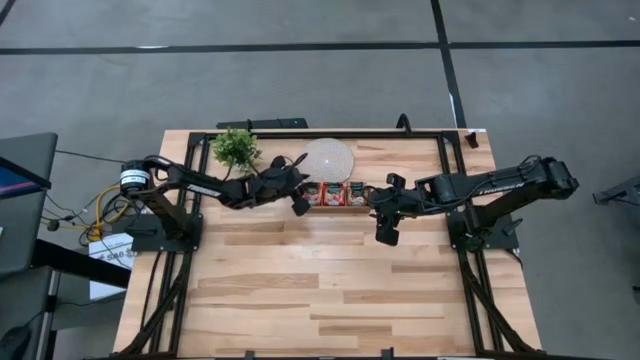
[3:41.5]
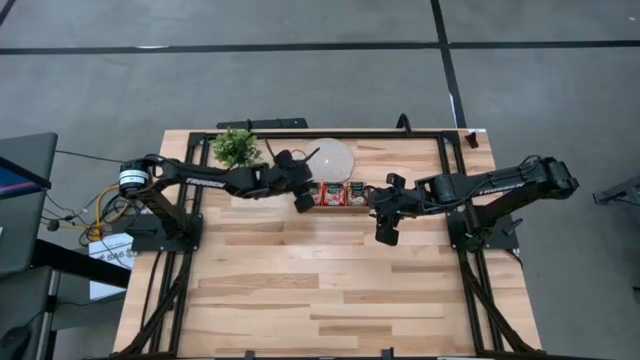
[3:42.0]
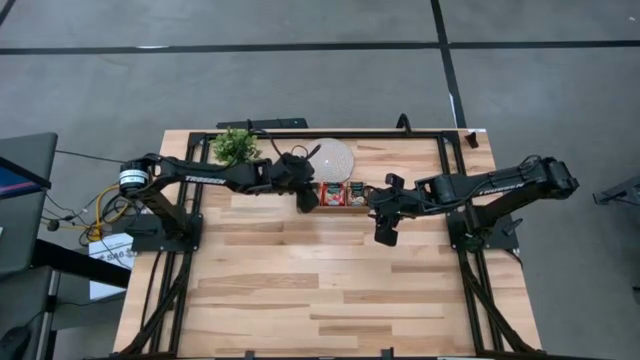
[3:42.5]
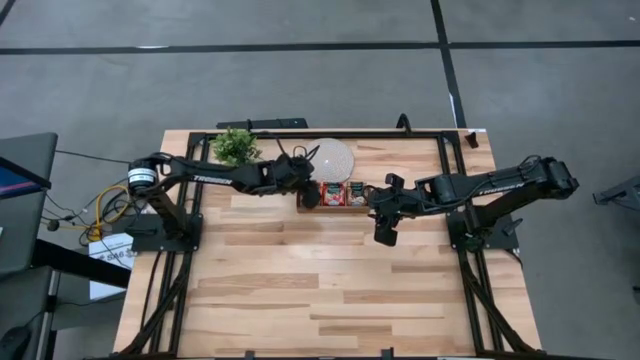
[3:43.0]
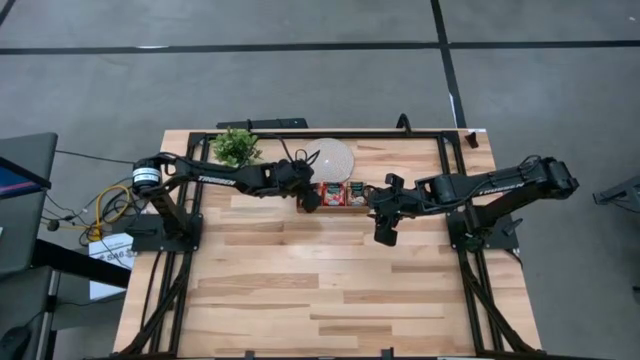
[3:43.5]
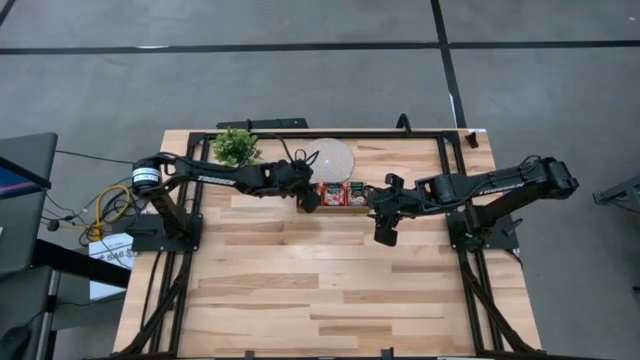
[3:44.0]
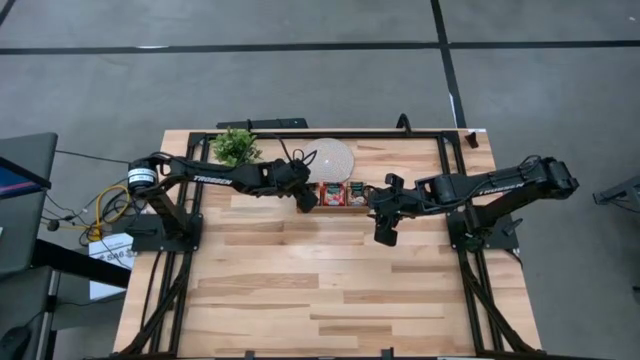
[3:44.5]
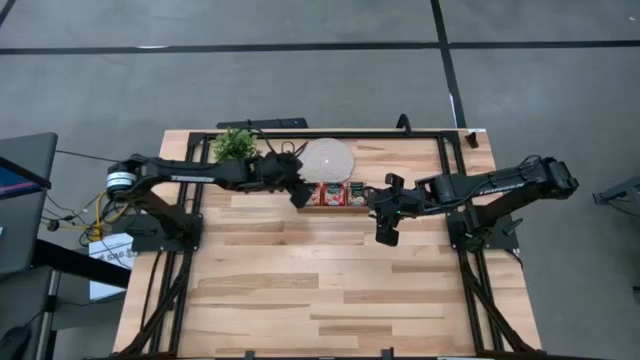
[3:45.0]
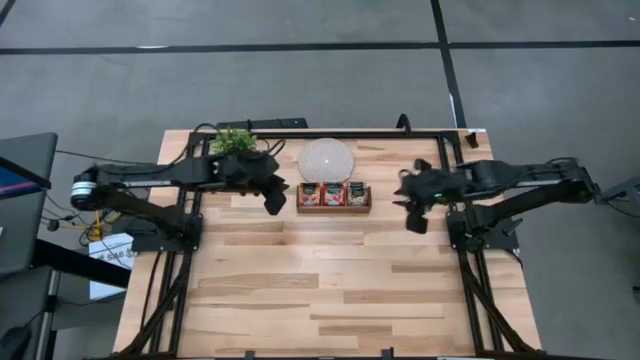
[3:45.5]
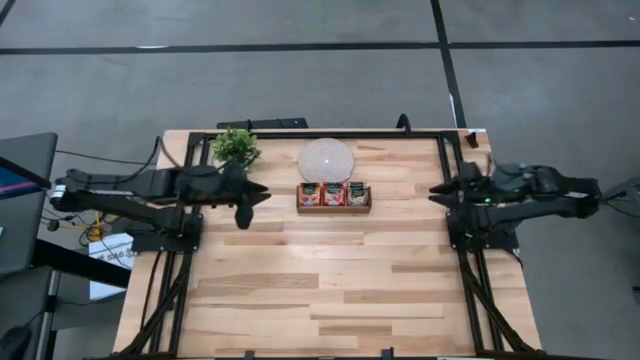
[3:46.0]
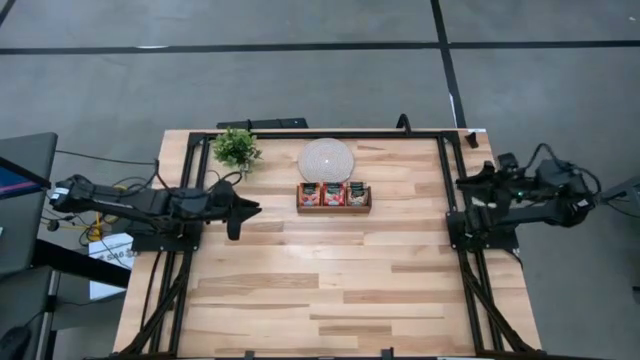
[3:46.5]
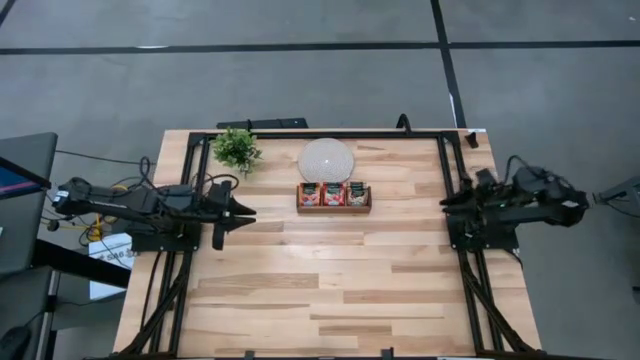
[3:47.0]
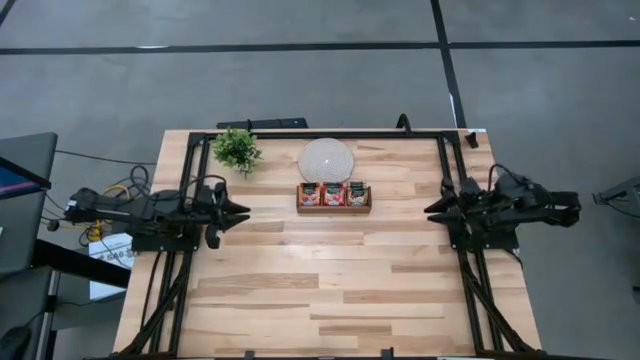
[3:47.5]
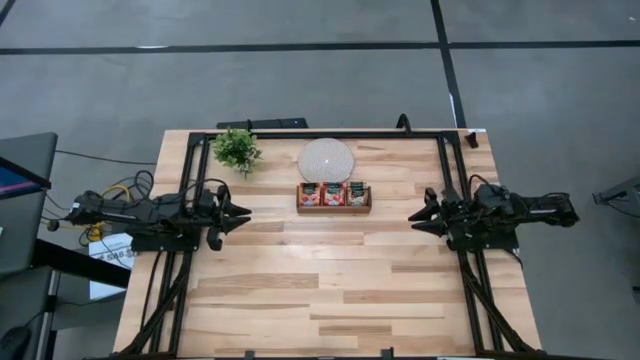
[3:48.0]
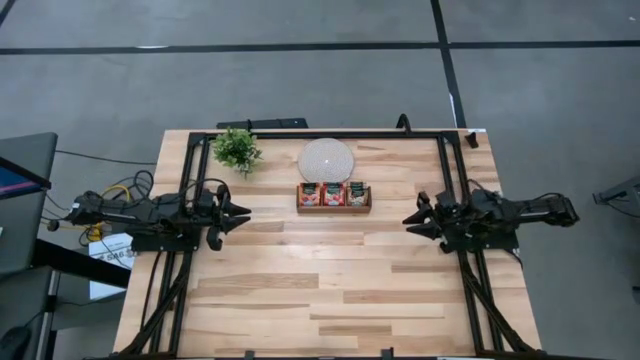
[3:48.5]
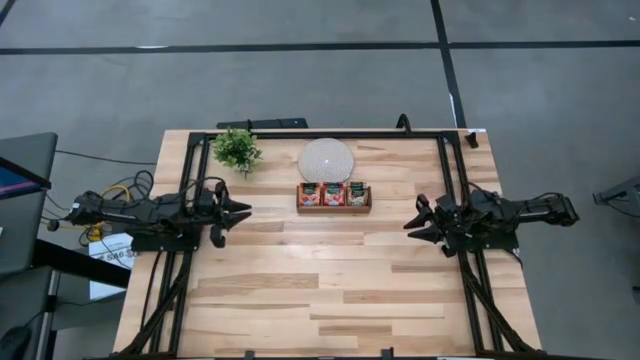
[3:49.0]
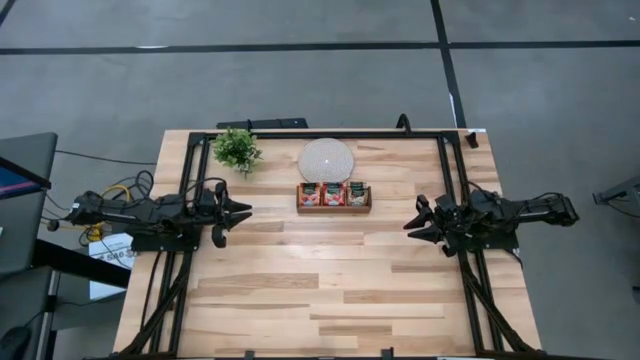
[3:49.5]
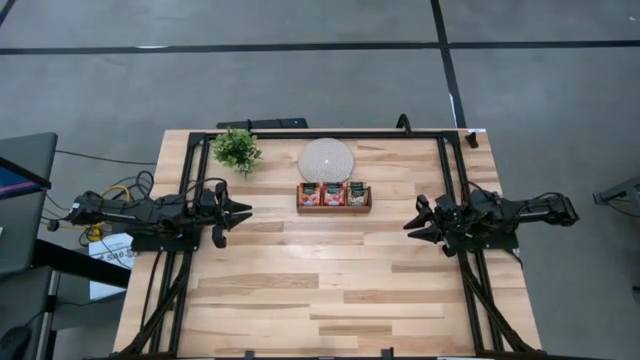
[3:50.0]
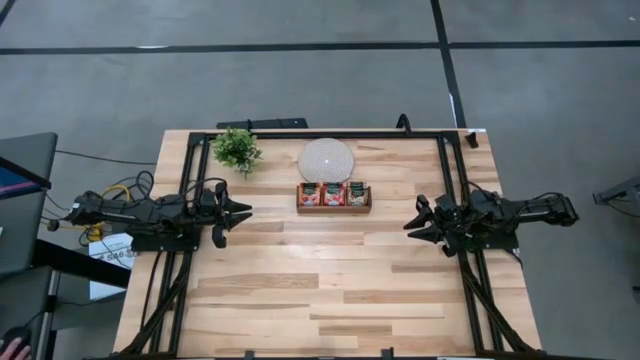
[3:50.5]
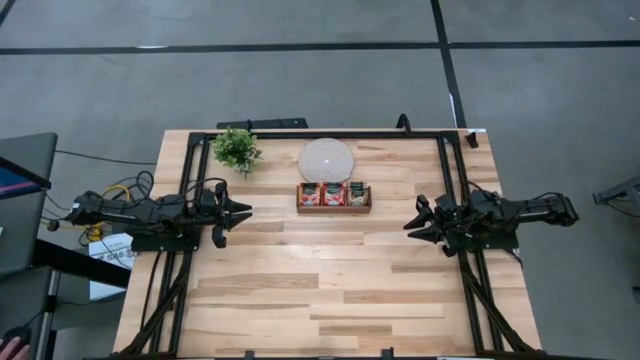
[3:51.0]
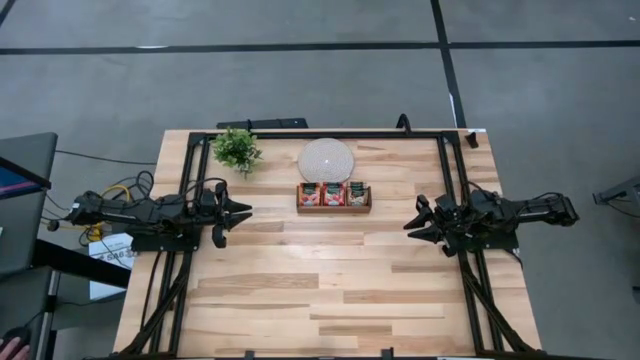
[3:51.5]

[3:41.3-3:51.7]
Task: Pick & Place Tea
Return to Home Position

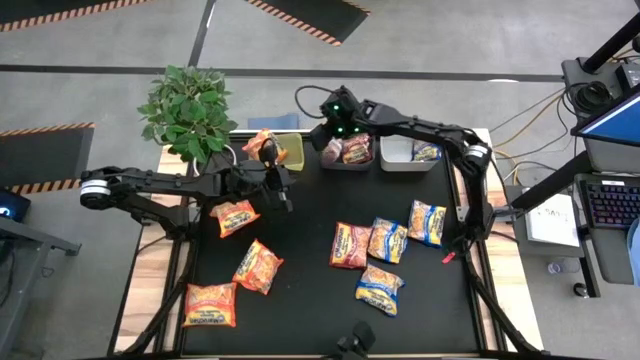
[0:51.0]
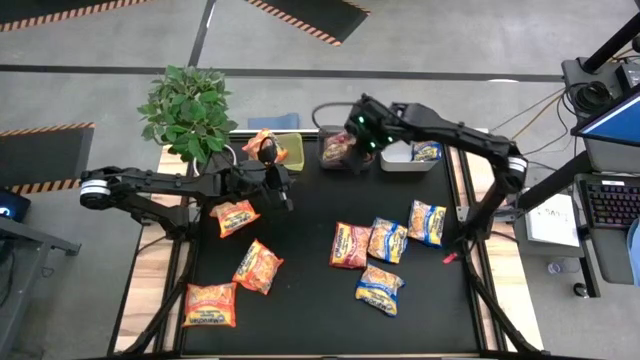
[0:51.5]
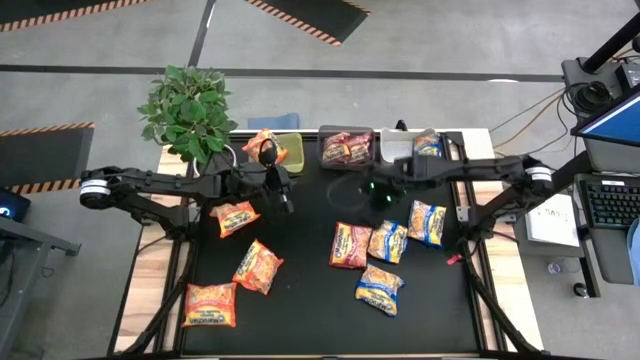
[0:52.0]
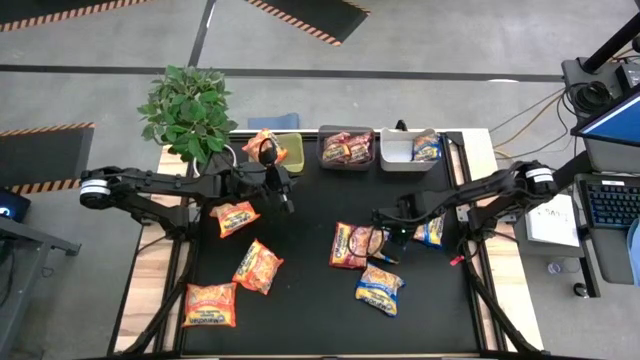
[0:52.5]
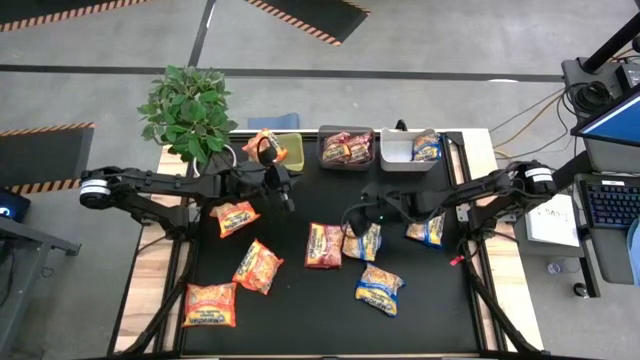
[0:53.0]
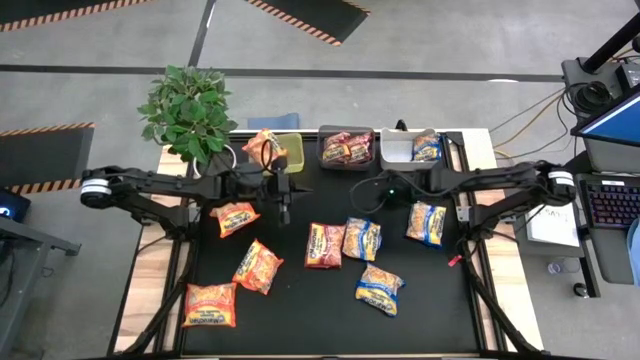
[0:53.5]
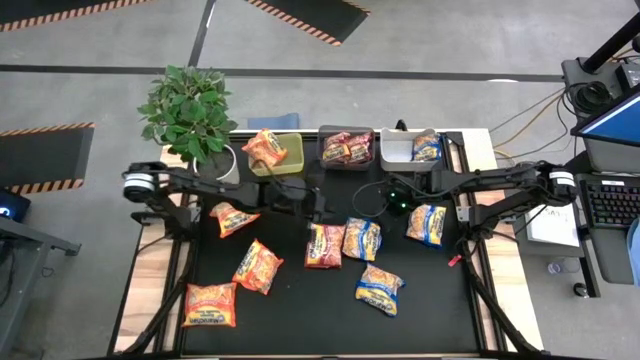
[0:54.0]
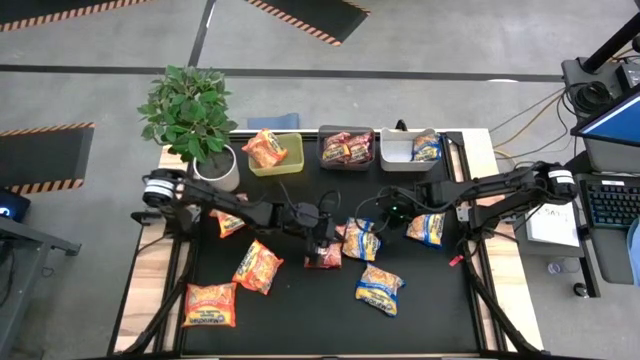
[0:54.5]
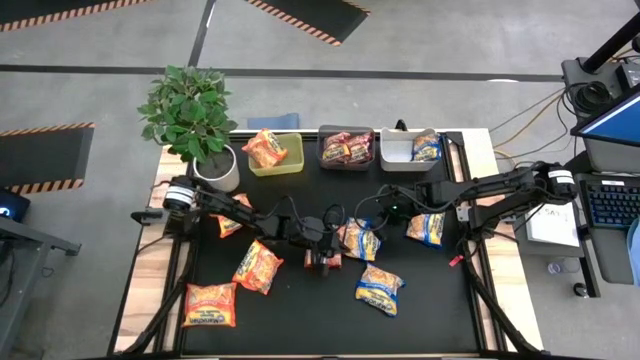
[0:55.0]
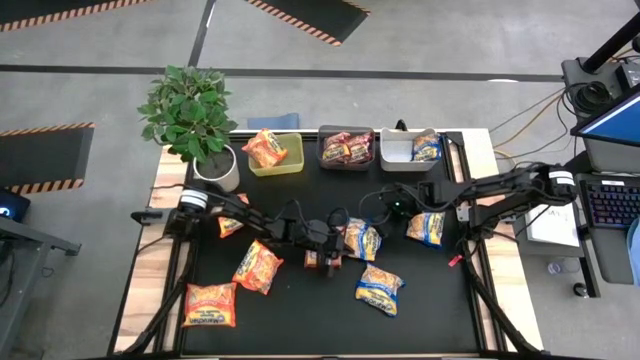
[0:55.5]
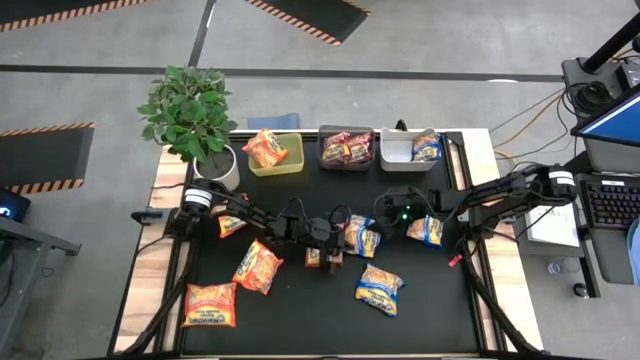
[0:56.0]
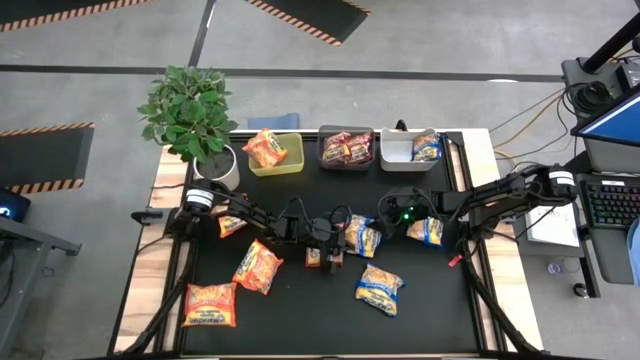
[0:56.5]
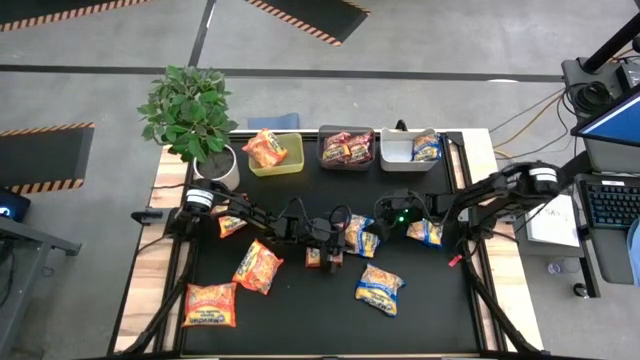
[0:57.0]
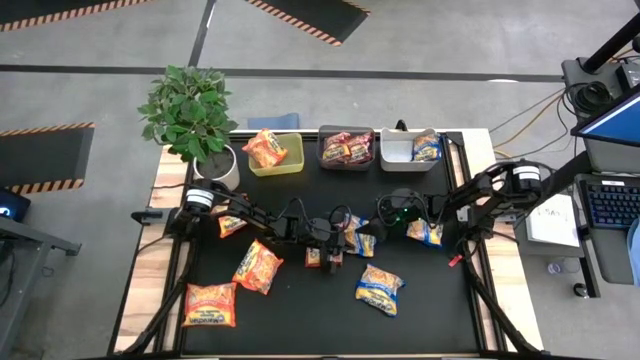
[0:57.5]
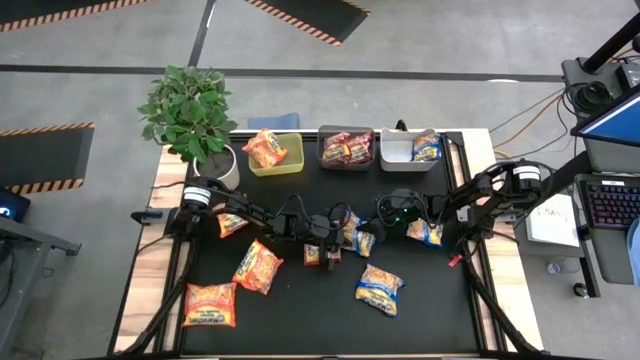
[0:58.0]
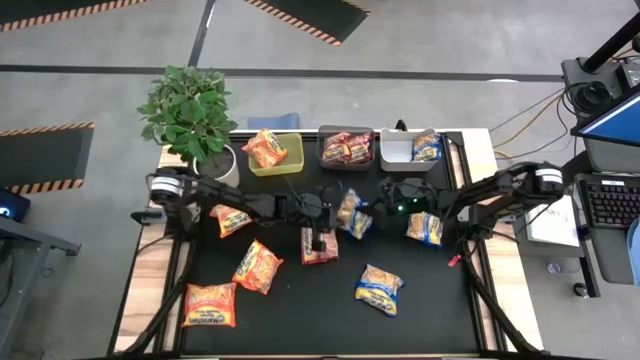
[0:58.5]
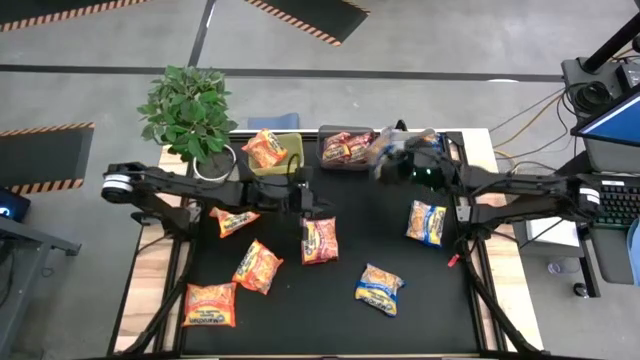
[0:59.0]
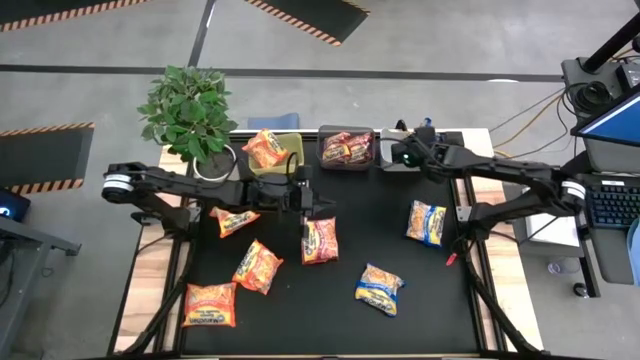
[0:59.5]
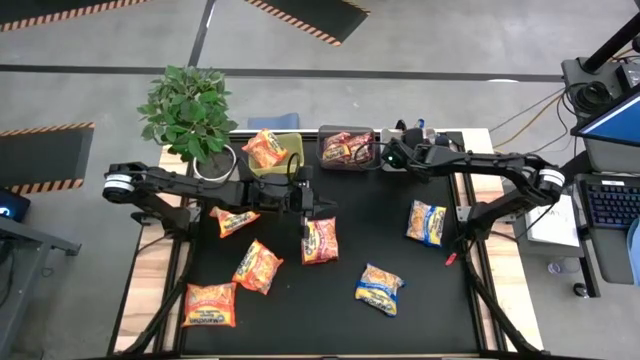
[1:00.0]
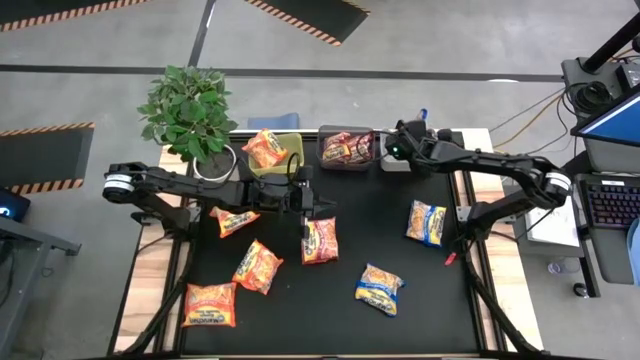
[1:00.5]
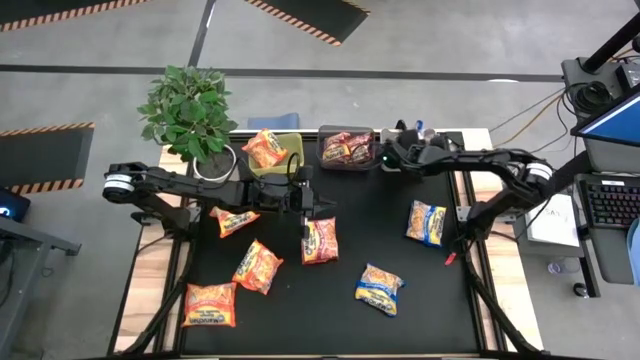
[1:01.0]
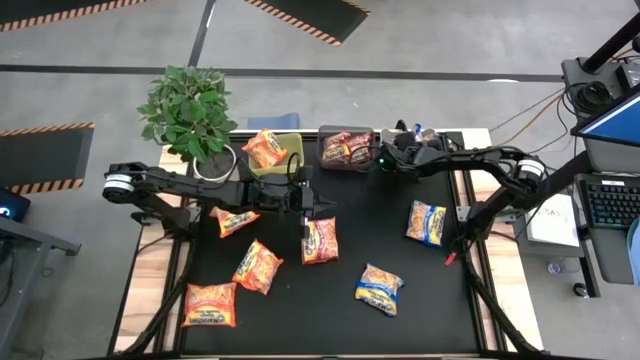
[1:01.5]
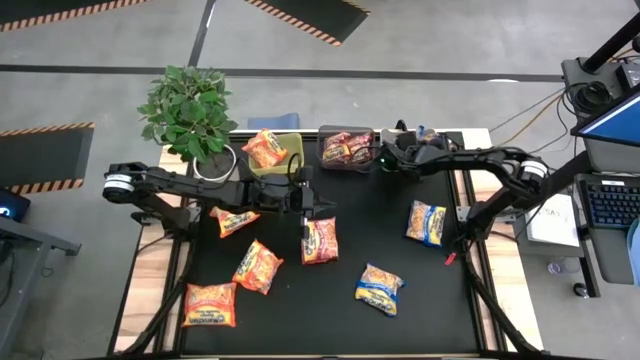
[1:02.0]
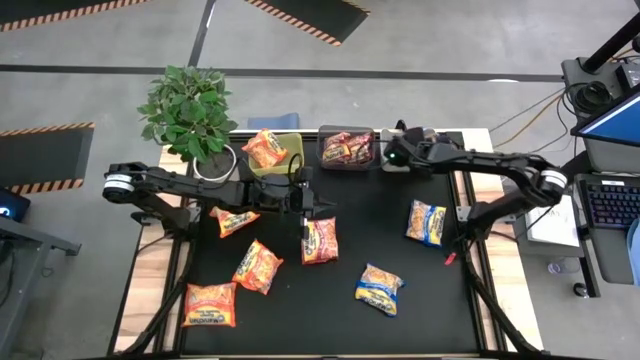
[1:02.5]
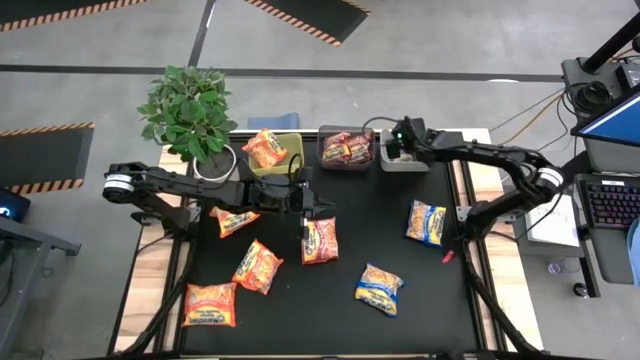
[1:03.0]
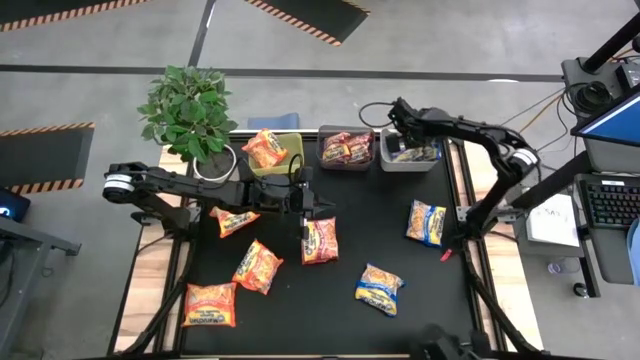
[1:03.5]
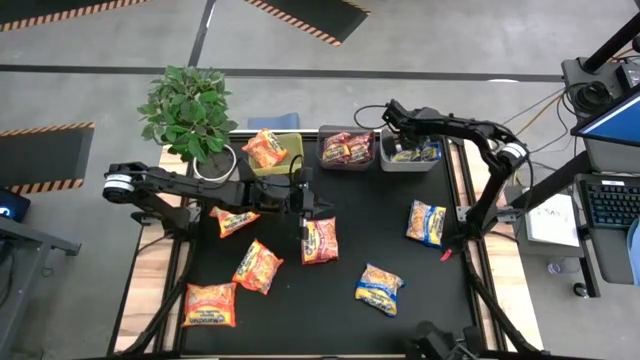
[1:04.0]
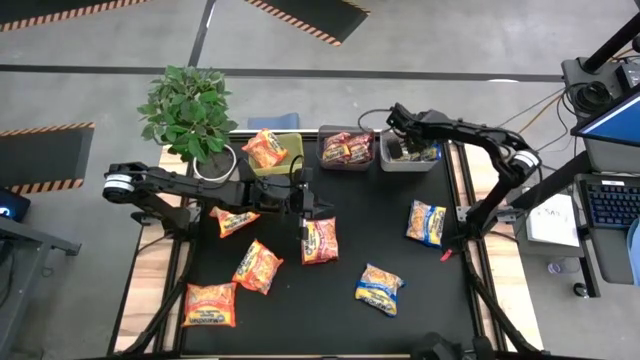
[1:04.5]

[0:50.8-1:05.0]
Task: Sort Maruchan noodles
Put the middle blue noodle pack into the white bin
